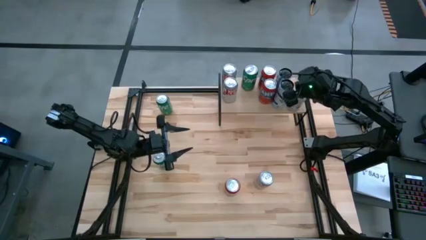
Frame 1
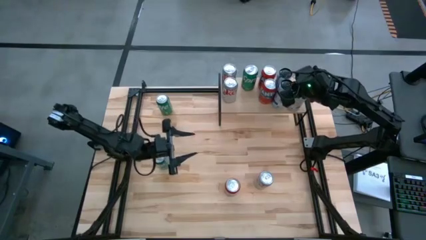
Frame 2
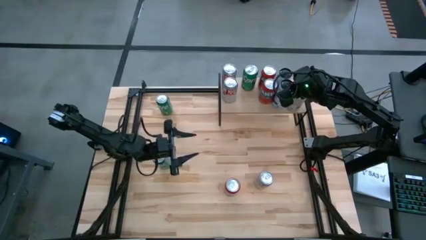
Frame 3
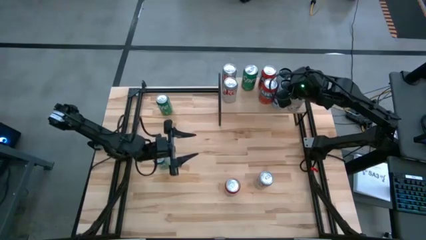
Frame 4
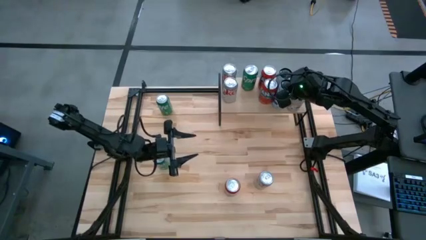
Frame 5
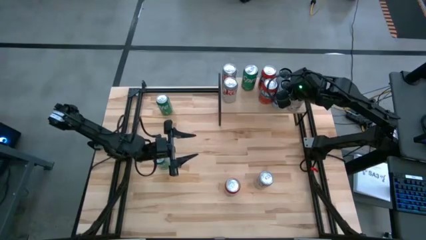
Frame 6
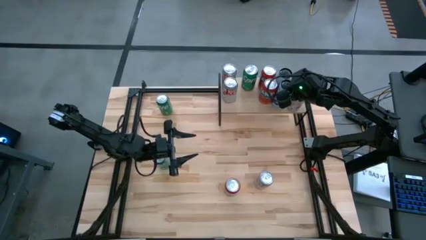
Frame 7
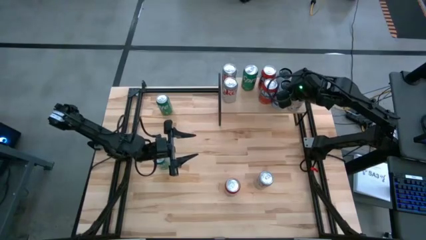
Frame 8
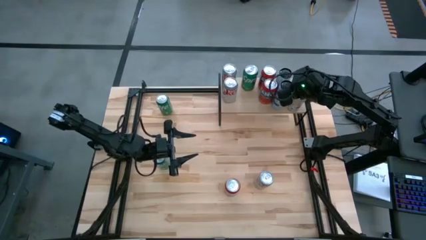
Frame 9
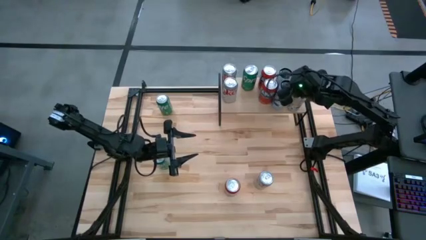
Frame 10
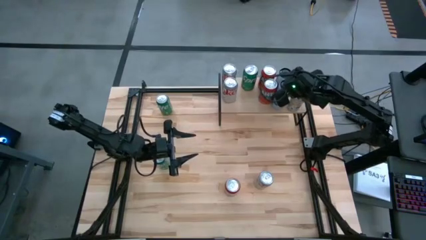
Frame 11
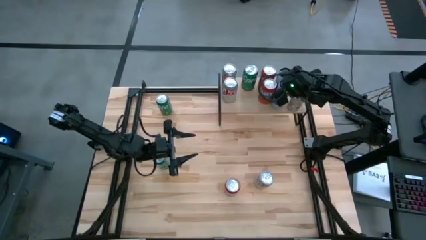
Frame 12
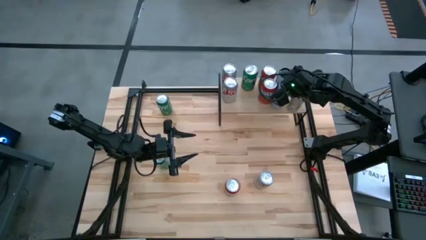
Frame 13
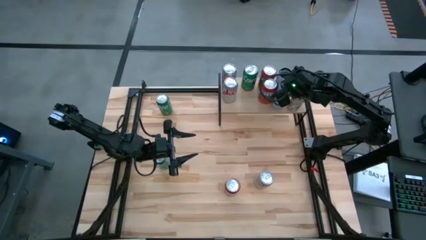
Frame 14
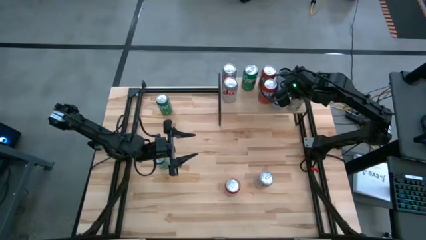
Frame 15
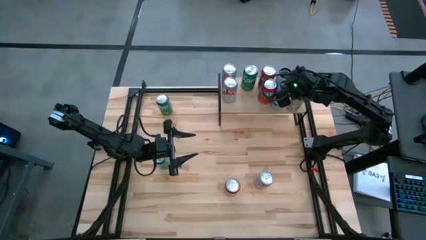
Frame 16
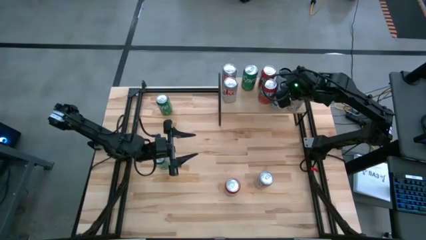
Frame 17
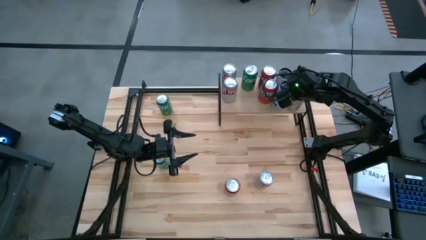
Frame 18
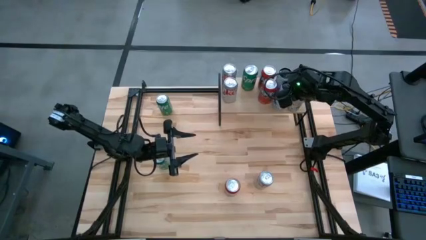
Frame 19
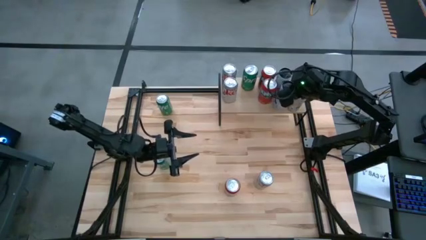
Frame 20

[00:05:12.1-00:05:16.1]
Task: Place canned beverage on shelf
Adjust the front right white soda can on the shelf

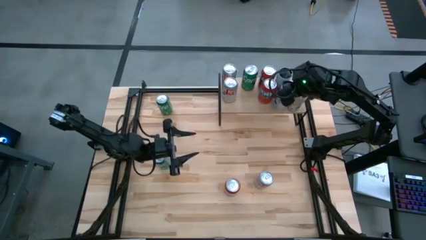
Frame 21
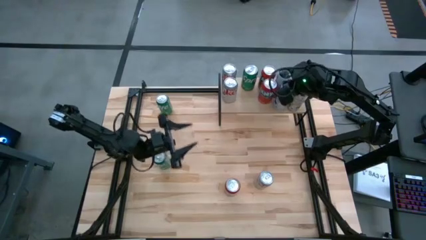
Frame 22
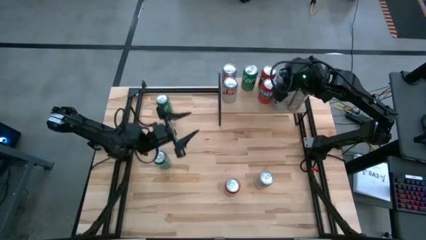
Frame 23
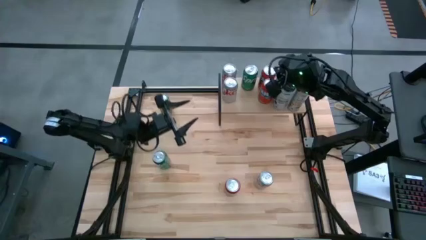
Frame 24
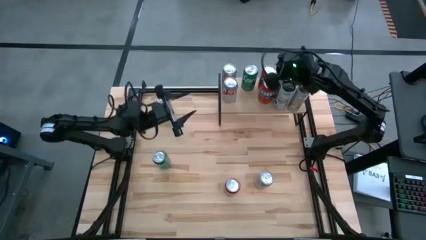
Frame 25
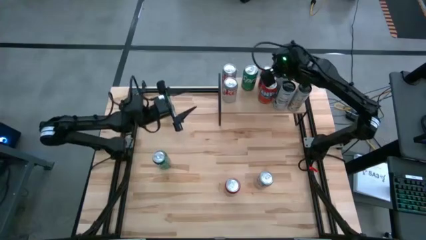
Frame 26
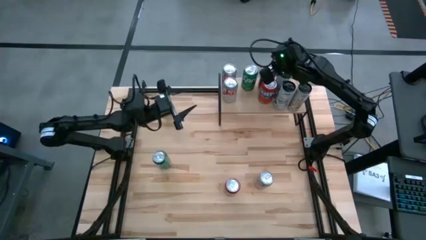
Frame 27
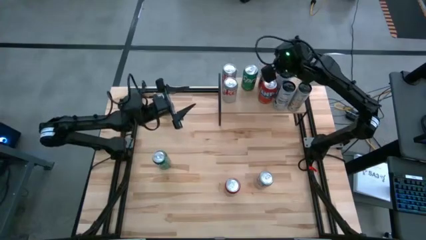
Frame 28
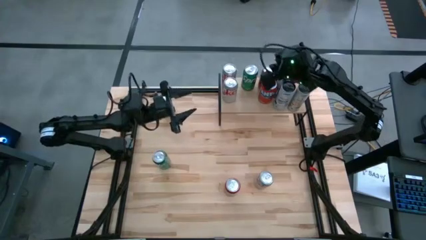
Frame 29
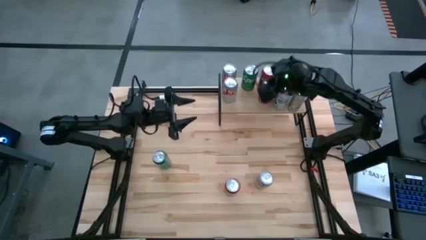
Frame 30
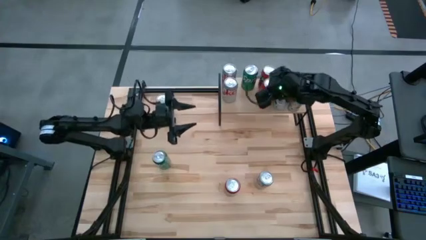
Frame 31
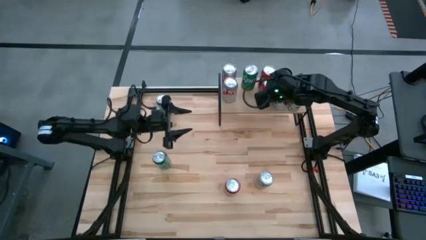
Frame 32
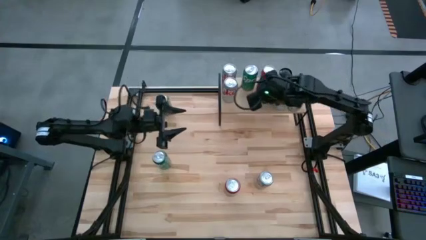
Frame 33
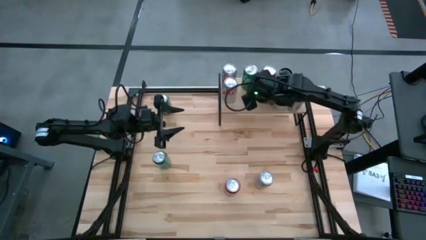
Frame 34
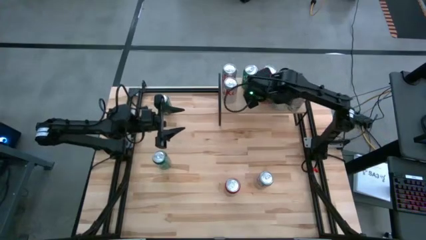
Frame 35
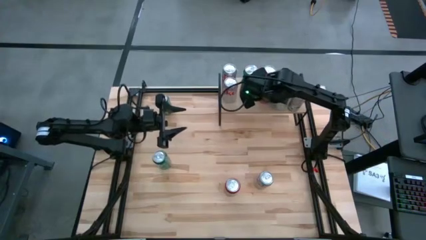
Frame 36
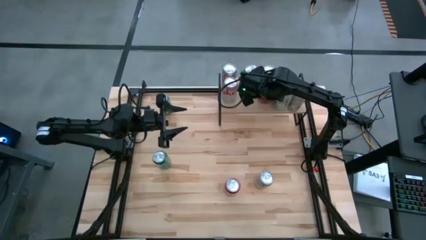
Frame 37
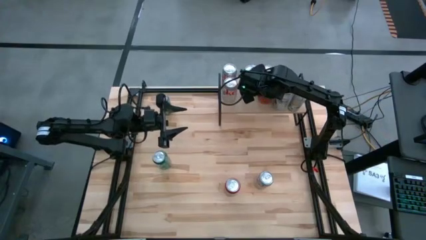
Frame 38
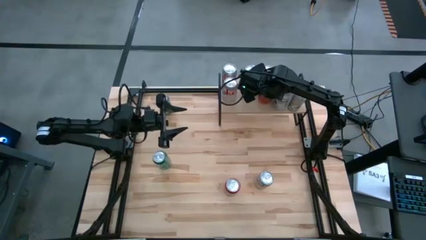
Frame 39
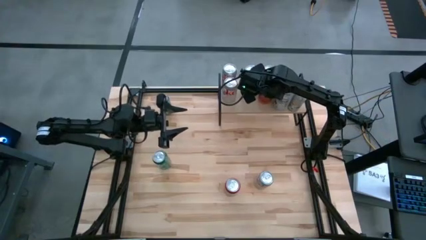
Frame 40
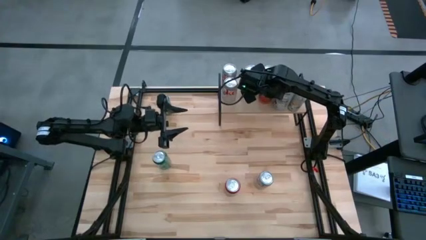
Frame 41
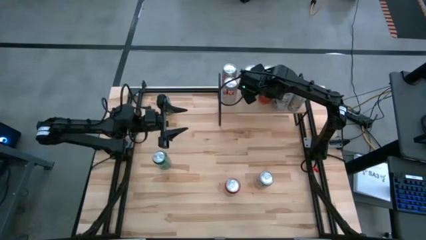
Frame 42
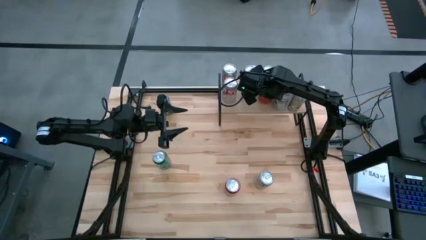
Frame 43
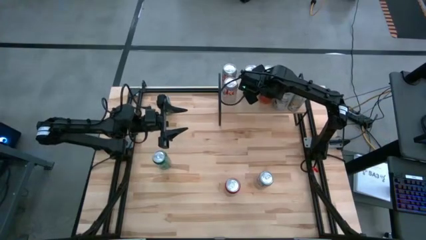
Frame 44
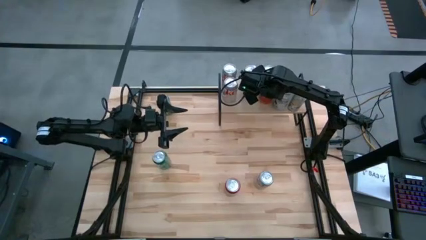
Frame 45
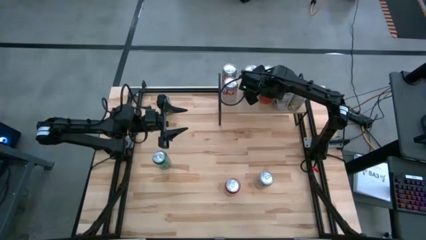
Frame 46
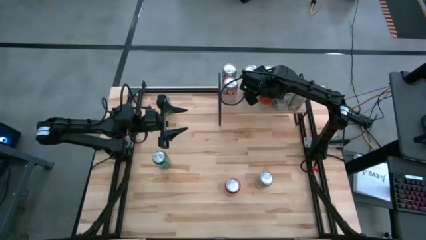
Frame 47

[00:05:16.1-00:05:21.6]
Adjust the front orange soda can on the shelf

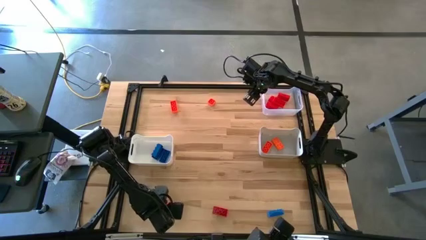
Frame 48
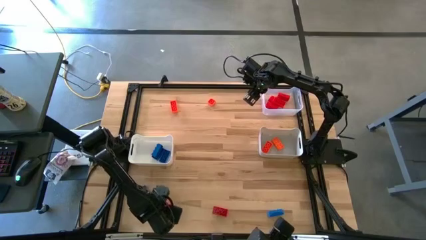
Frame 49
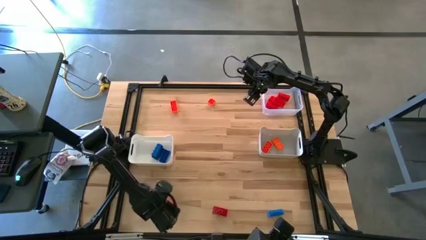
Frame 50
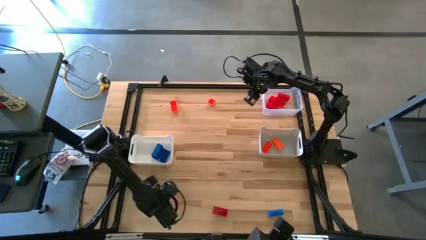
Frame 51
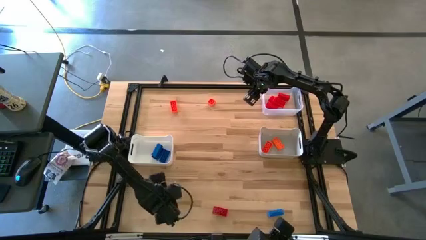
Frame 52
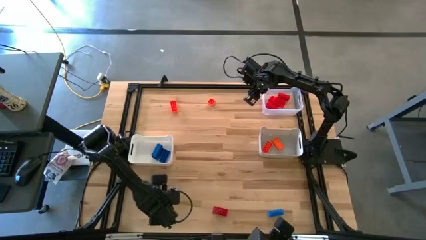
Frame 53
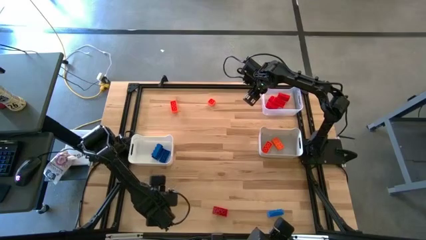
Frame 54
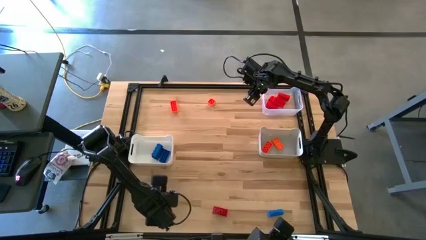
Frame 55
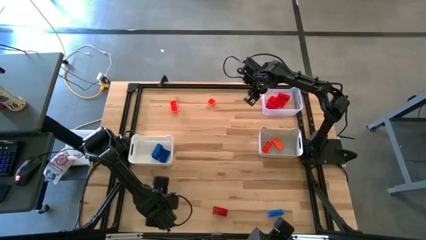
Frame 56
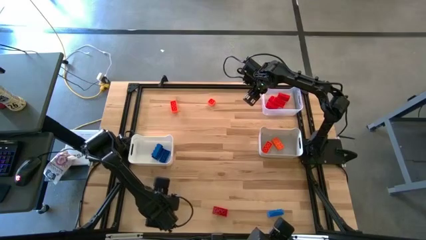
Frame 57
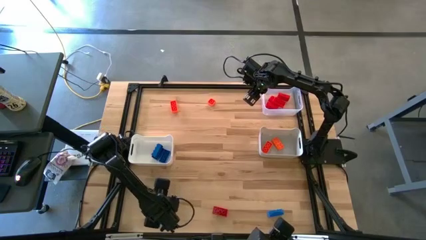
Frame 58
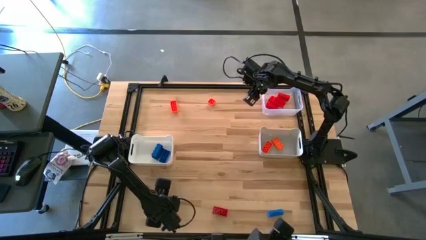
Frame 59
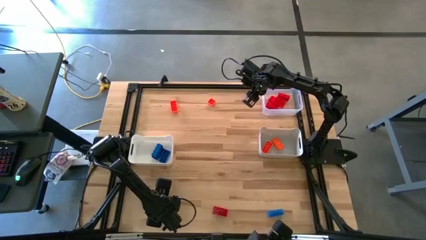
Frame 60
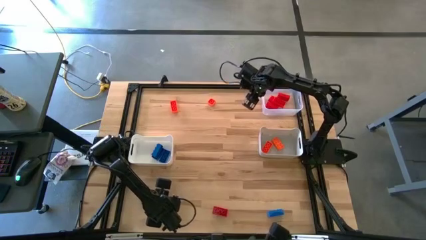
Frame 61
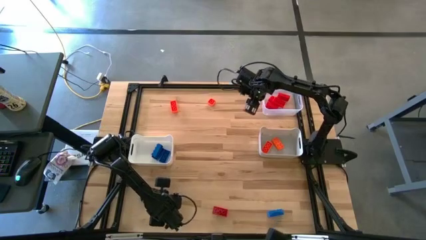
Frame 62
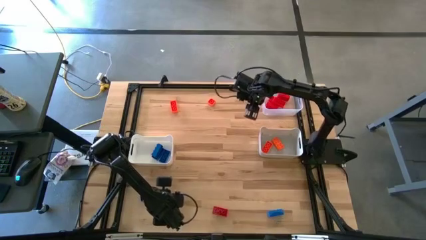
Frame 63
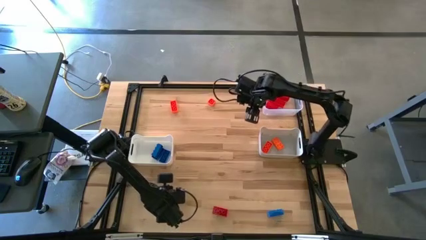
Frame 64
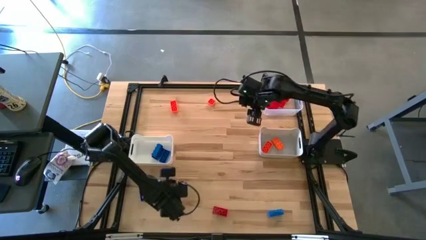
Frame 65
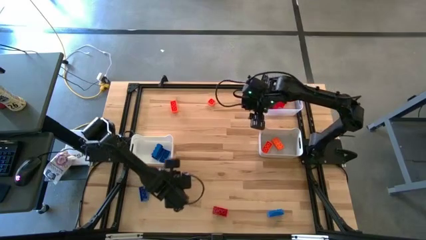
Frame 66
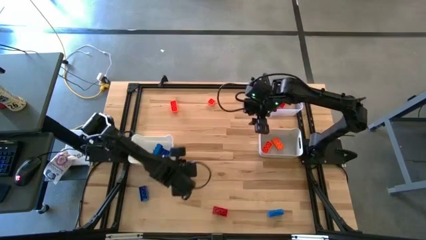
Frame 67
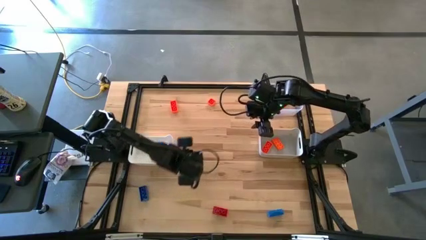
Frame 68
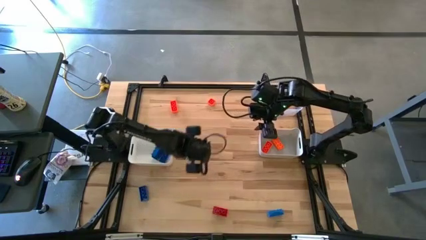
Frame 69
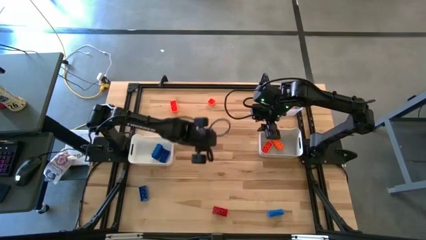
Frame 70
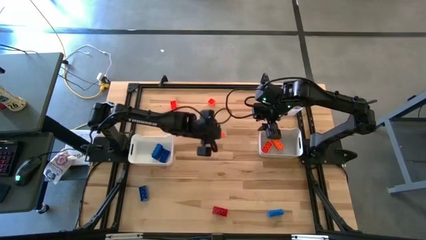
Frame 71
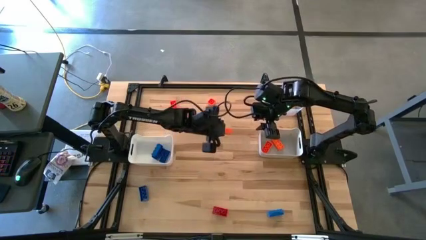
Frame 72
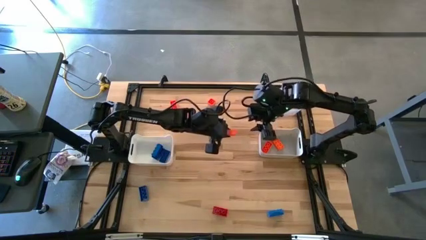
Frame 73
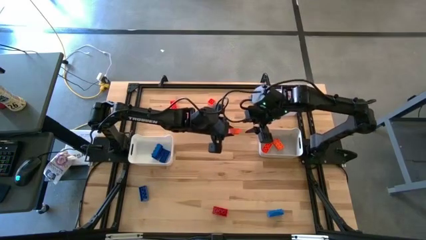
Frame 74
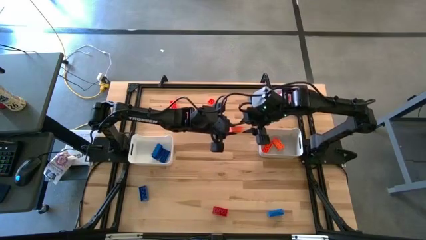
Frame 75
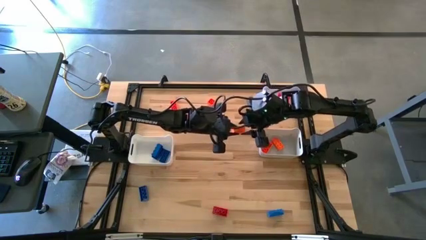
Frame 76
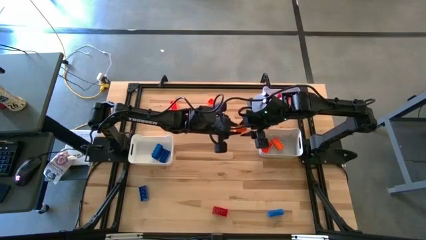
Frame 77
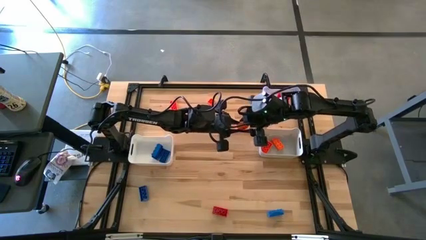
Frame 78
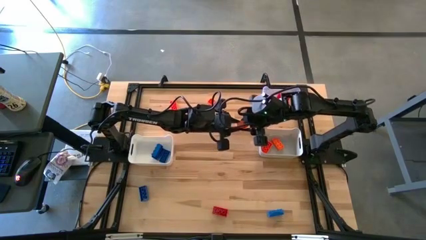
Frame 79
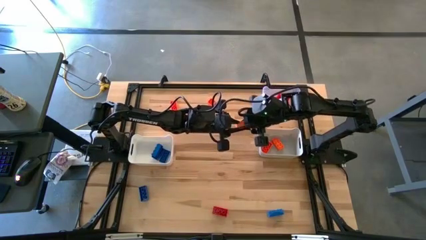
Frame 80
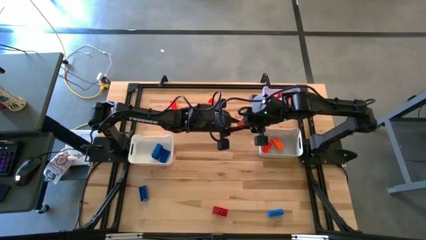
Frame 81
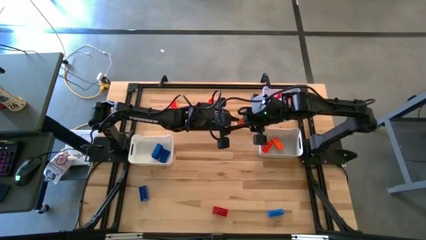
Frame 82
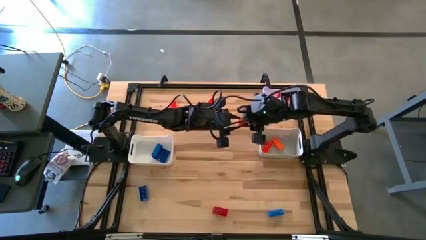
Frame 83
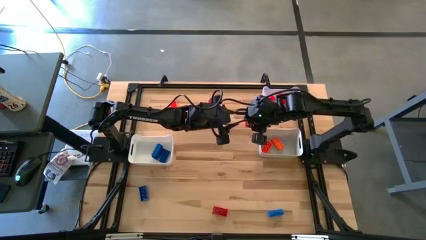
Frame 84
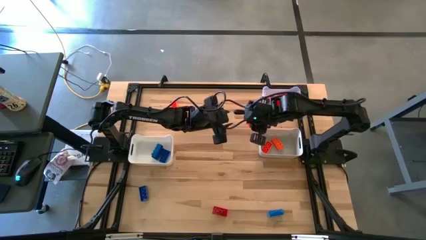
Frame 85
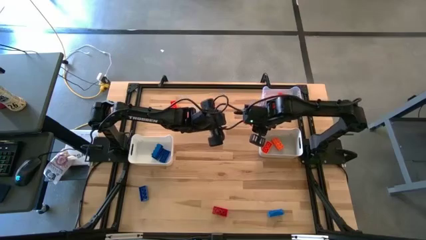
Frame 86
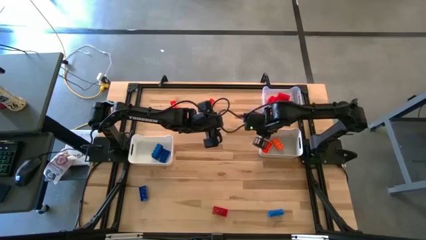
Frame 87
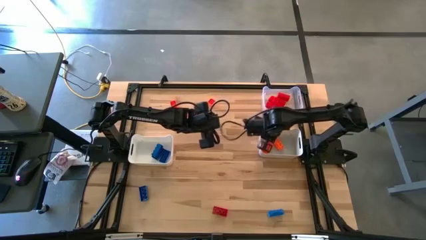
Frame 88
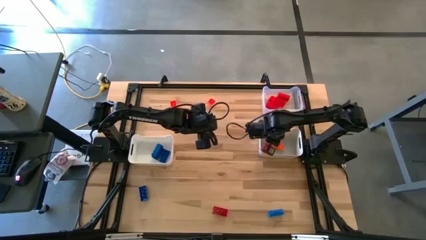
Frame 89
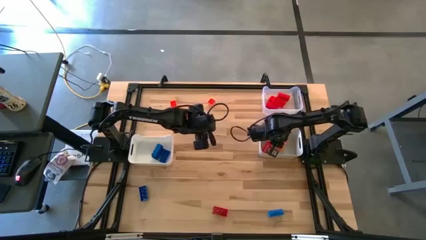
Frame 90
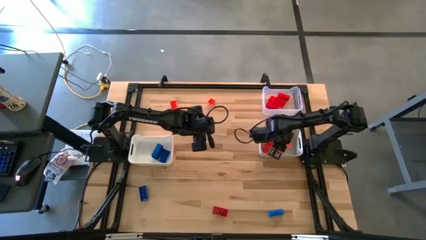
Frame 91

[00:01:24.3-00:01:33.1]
Task: Sort & place blocks by color
Put the orange game piece into the gray bin
